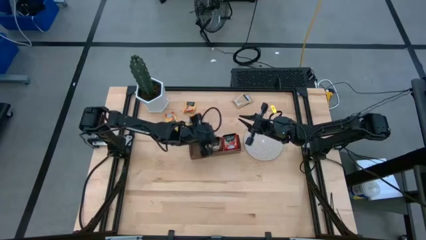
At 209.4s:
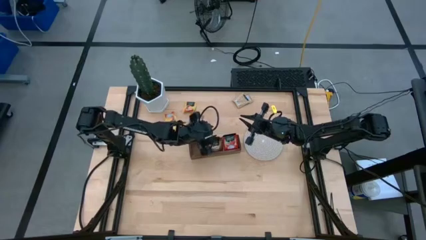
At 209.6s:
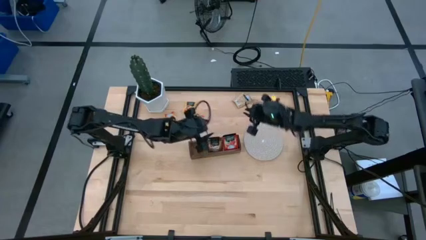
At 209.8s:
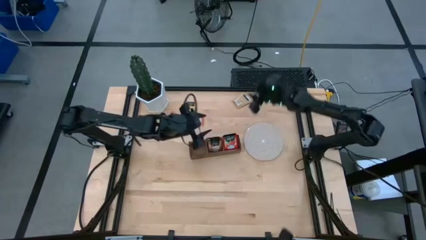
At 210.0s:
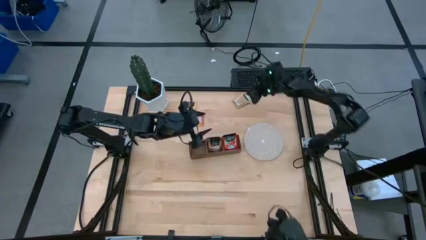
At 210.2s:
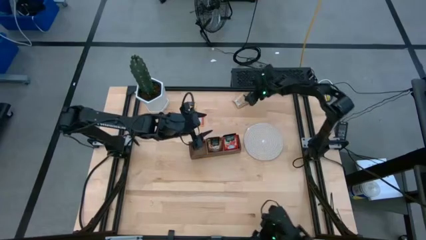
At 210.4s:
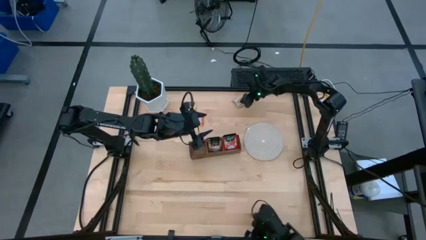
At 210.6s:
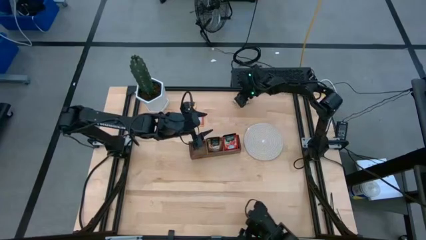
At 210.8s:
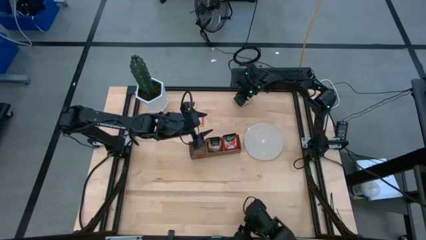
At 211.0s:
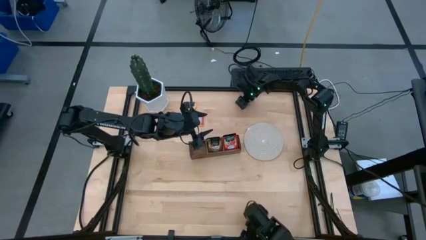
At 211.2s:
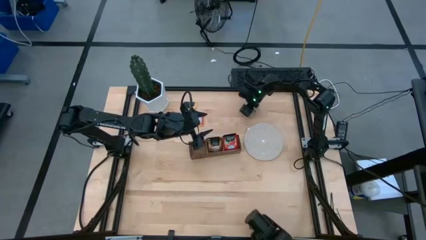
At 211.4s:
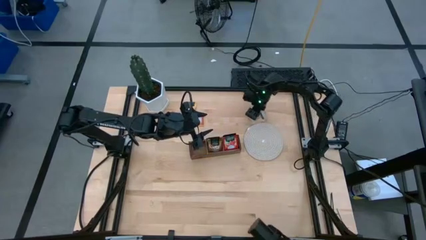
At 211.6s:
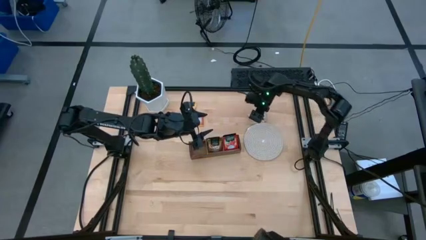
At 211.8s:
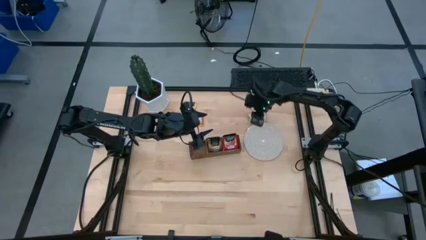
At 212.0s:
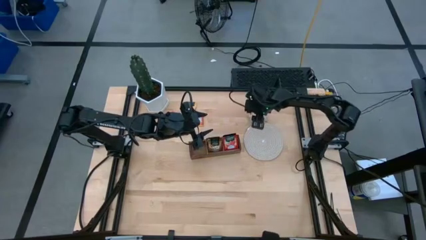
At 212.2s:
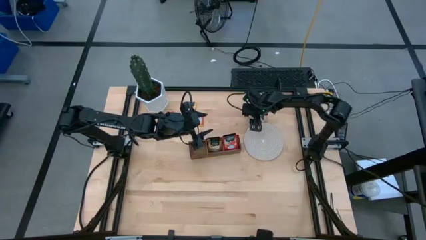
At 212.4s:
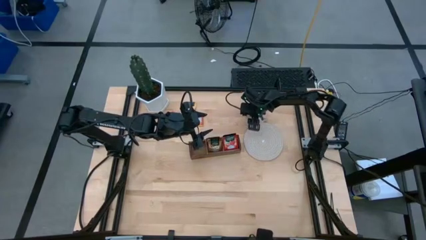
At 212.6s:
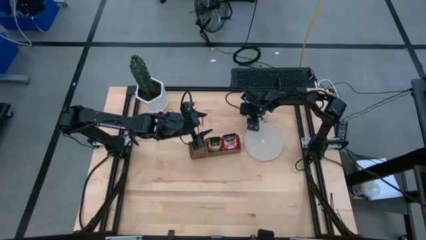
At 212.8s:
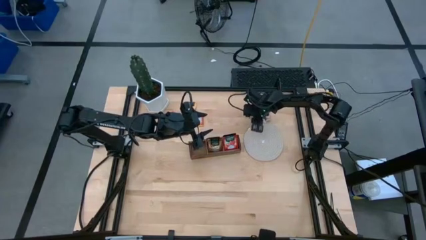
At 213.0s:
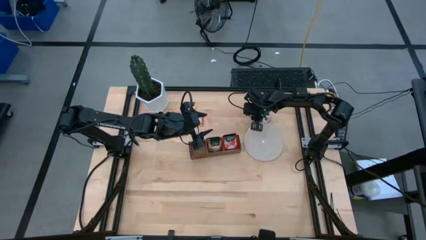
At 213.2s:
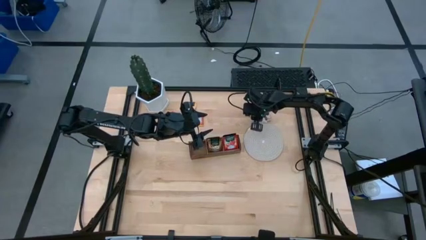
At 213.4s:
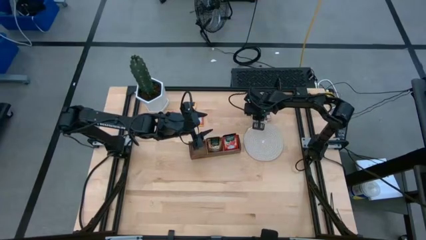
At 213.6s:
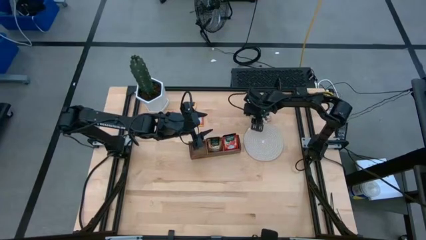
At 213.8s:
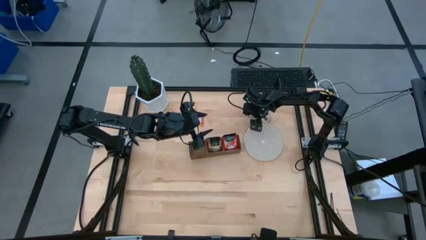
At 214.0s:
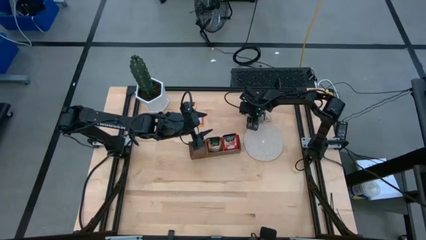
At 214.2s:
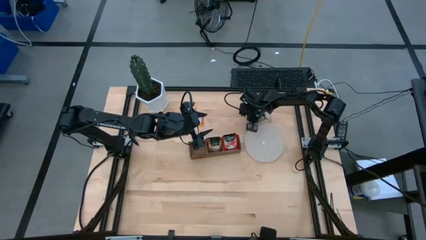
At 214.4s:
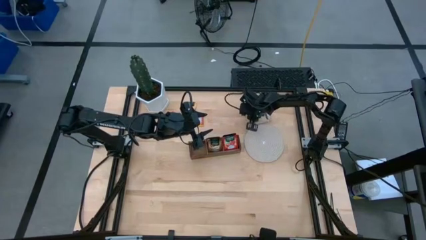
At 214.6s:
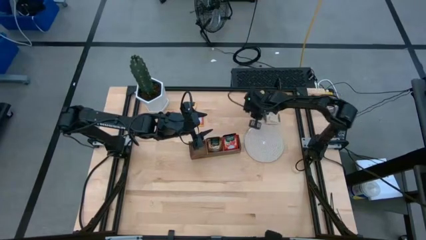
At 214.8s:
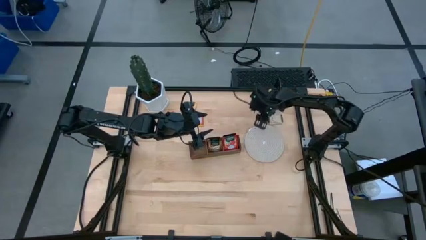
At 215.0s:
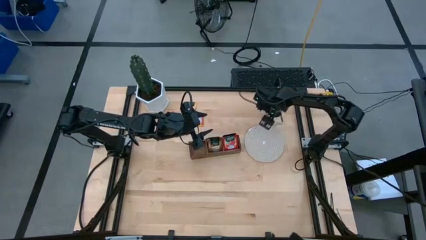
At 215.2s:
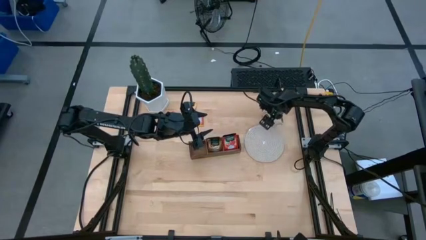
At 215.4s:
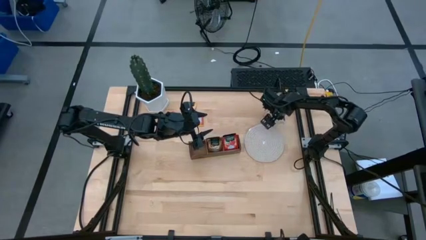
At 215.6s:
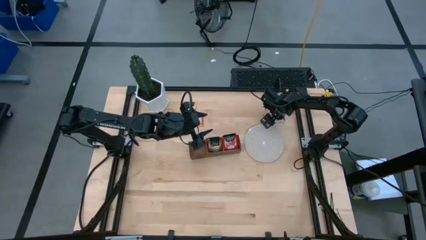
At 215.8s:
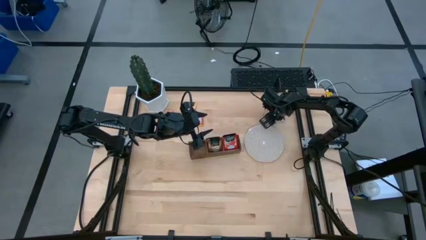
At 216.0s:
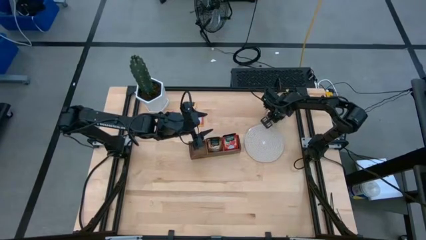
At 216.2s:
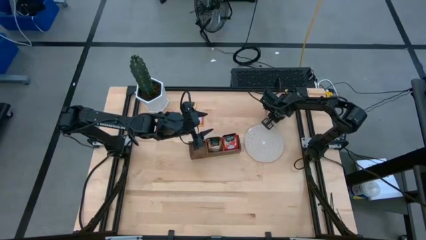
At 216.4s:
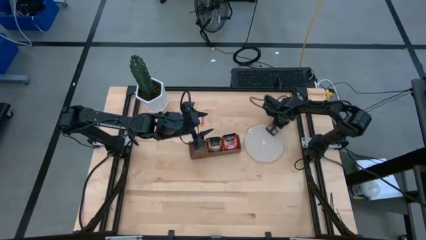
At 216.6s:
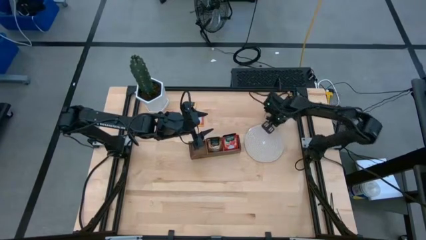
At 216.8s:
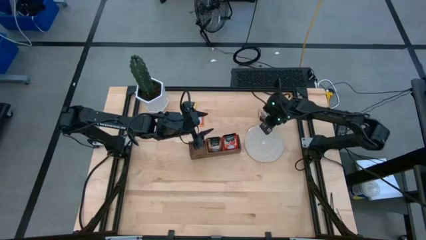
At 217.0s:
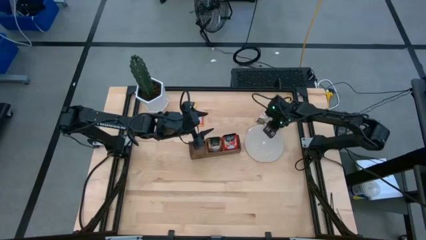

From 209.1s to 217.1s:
Task: Pick & Place Tea
Put the brown tea bag into the middle section of the wooden organizer

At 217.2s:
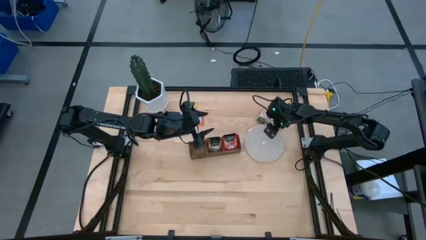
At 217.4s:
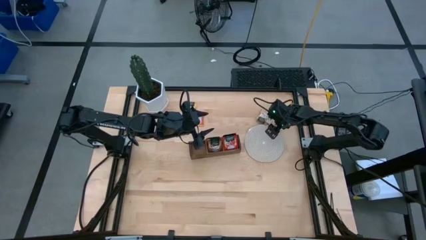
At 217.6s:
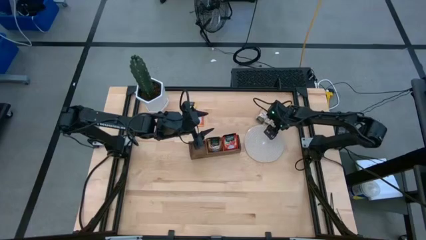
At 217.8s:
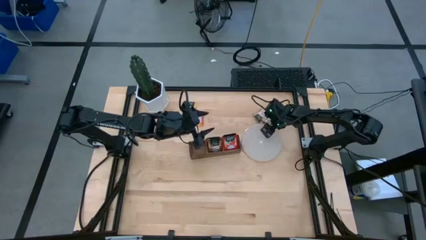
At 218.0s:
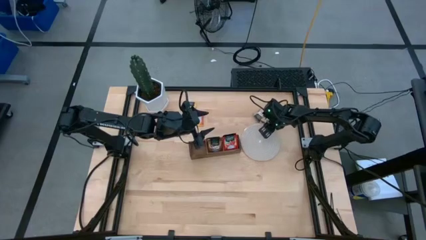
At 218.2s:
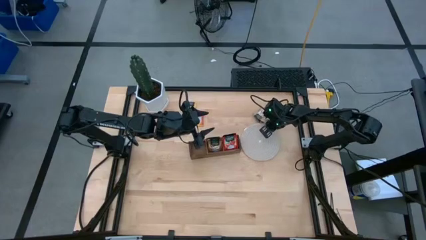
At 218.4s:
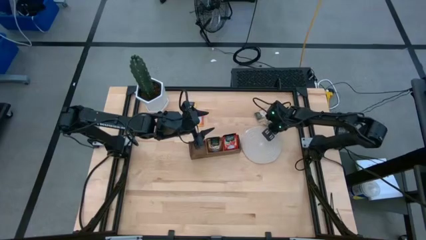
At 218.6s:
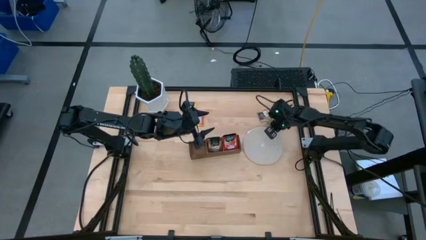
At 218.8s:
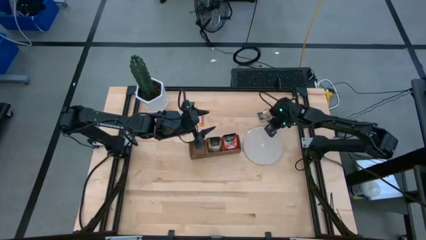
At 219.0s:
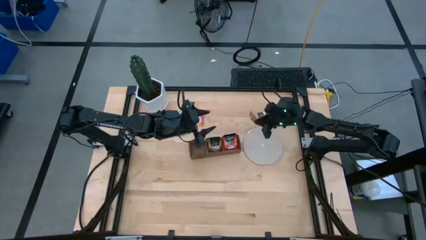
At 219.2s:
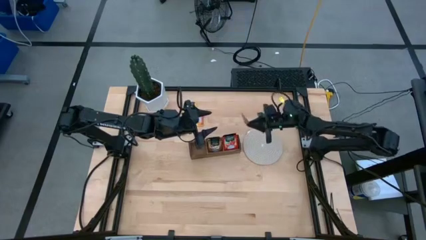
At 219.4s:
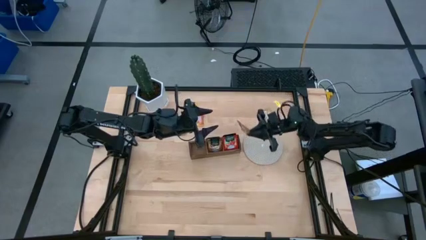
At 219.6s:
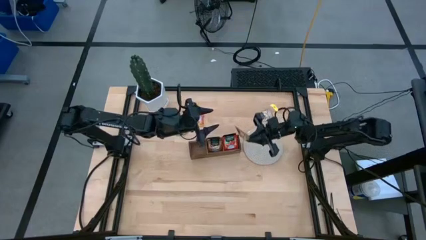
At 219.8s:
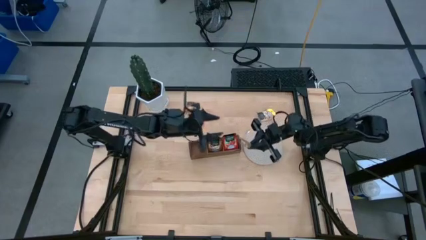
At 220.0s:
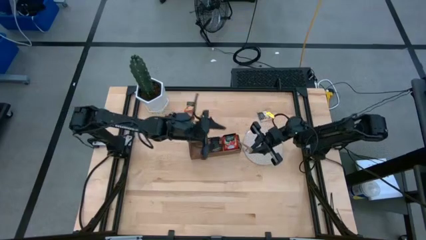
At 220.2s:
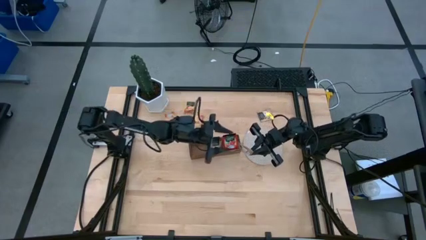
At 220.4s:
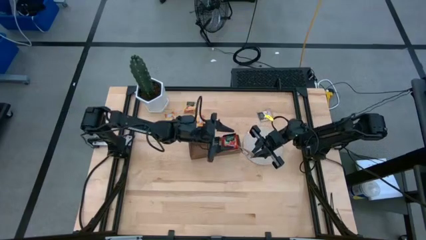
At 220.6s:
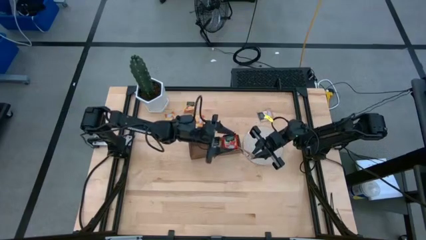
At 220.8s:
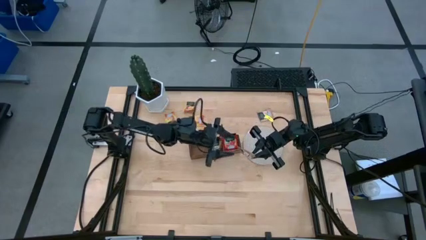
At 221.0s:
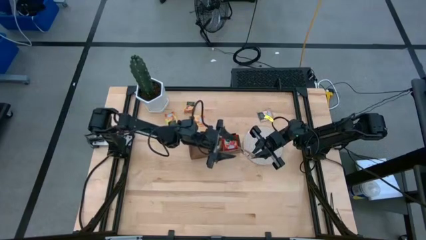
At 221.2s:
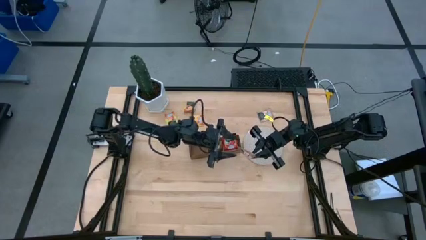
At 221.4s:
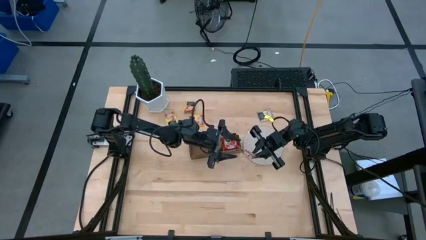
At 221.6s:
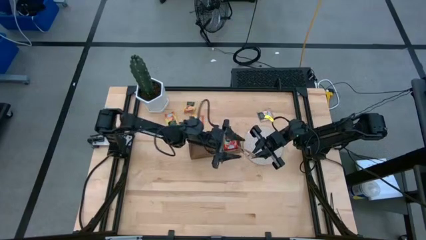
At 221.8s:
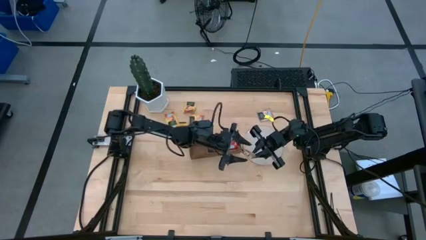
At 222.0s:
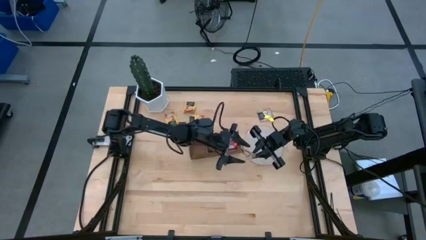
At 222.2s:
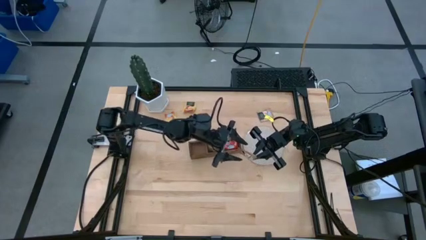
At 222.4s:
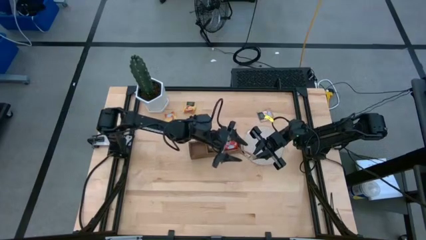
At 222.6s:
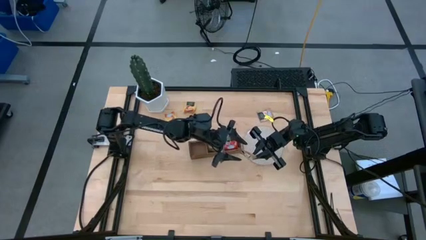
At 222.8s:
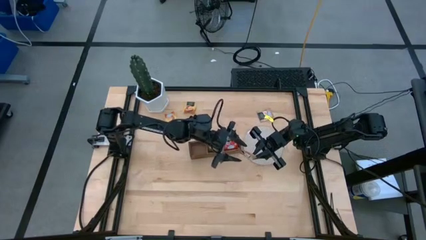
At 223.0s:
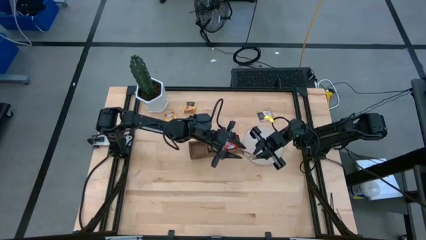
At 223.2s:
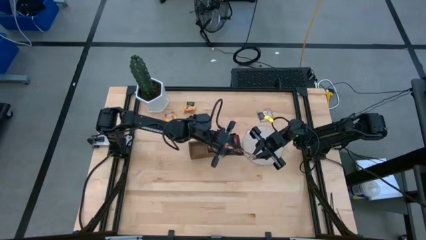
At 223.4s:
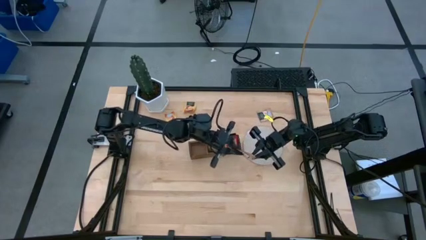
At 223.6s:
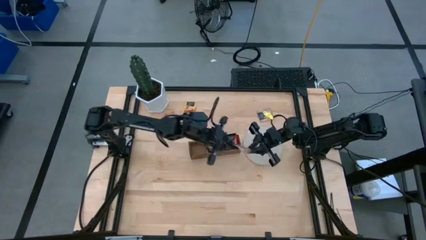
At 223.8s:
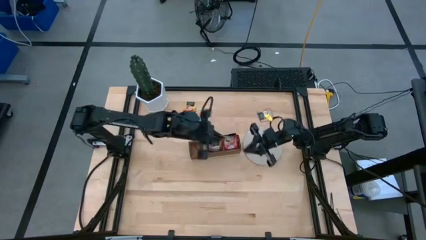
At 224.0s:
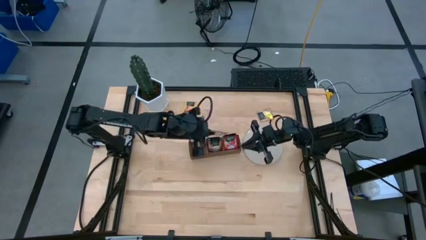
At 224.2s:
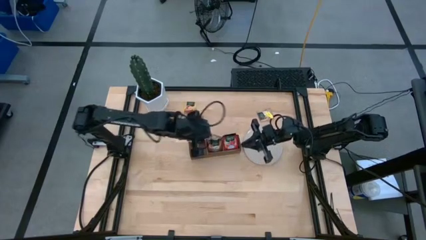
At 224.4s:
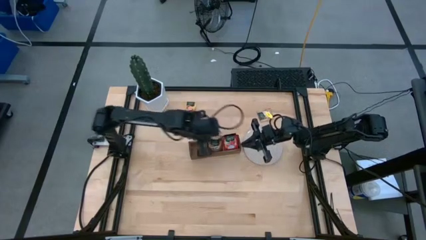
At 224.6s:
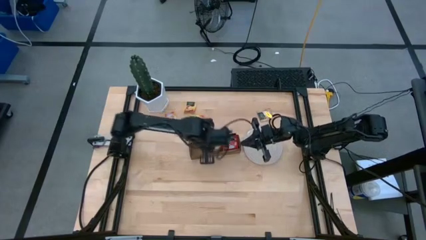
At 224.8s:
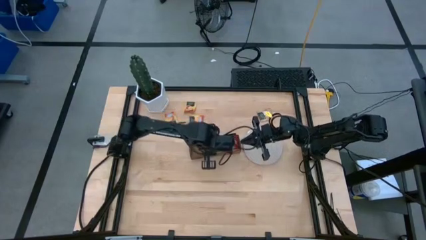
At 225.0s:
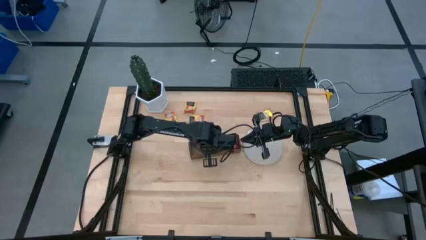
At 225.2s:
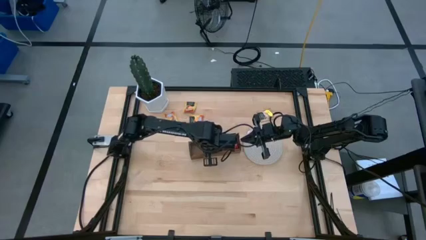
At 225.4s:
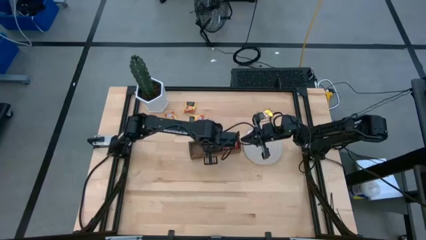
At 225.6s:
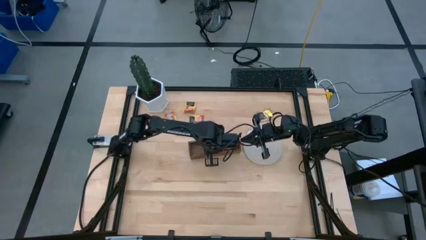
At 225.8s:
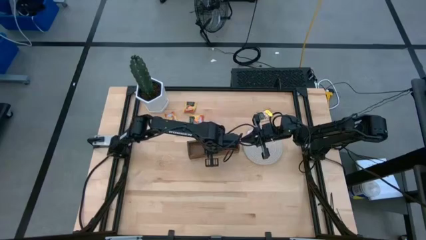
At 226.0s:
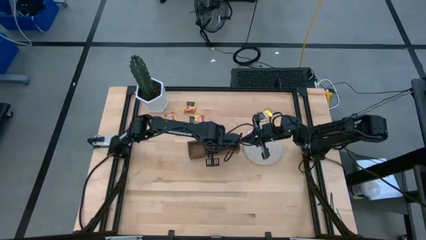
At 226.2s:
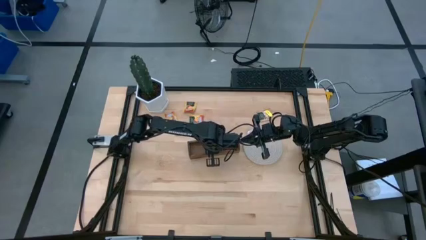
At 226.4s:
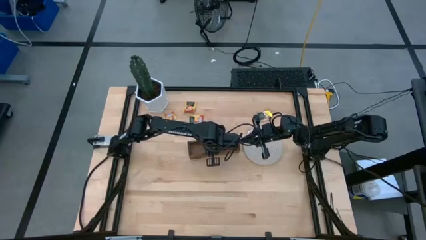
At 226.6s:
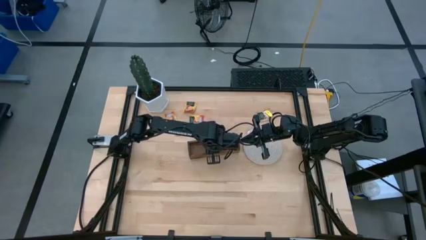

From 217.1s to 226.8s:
Put the brown tea bag into the middle section of the wooden organizer
